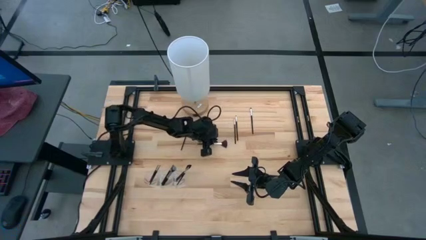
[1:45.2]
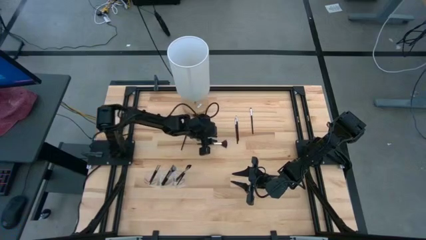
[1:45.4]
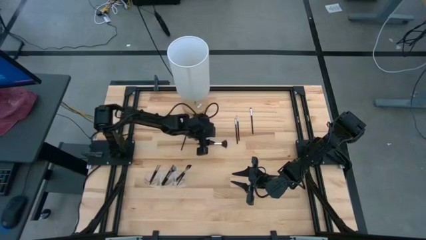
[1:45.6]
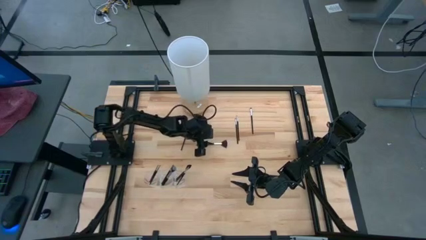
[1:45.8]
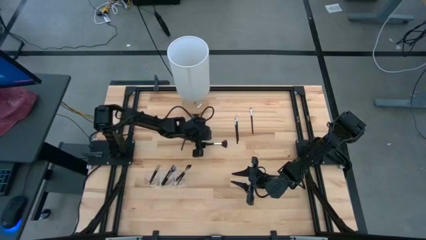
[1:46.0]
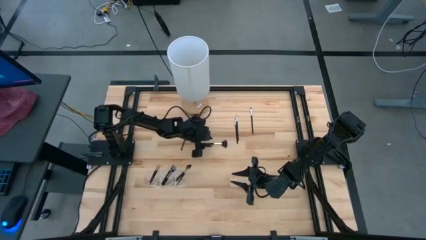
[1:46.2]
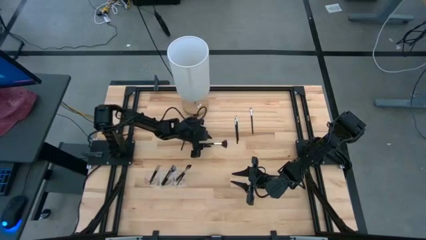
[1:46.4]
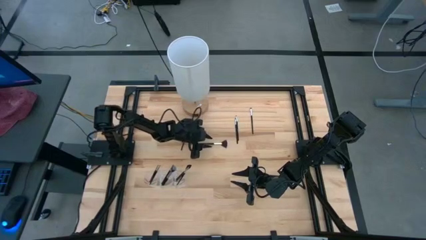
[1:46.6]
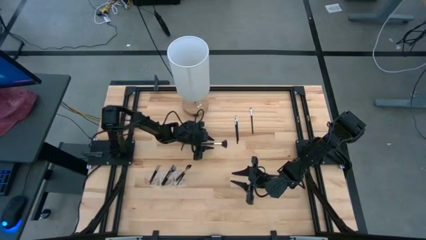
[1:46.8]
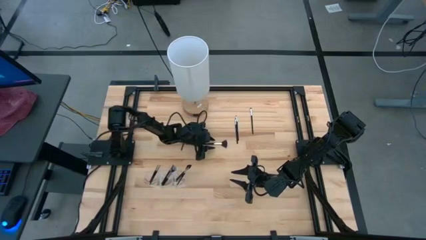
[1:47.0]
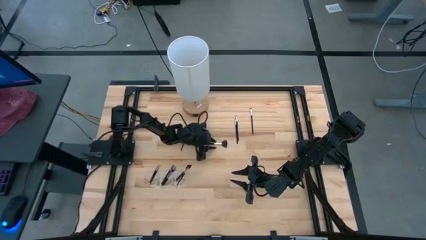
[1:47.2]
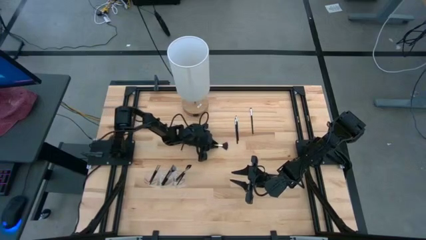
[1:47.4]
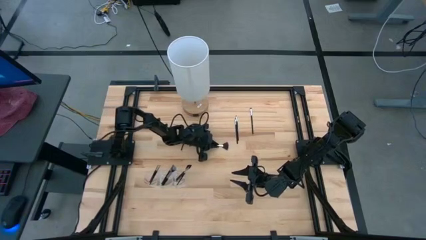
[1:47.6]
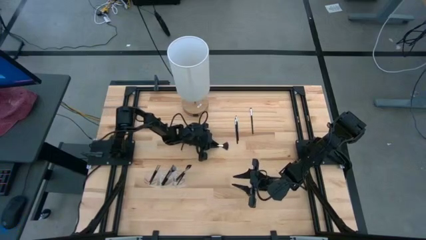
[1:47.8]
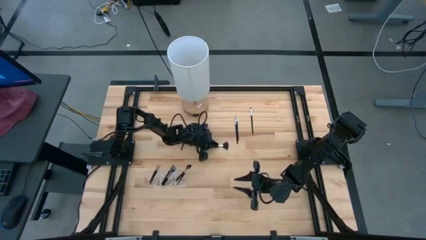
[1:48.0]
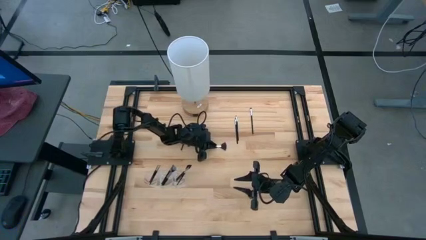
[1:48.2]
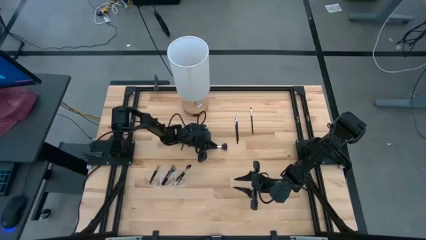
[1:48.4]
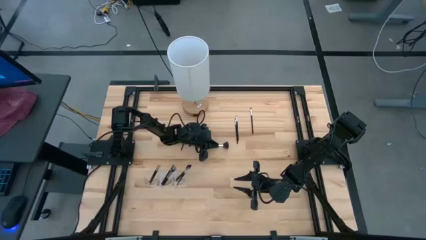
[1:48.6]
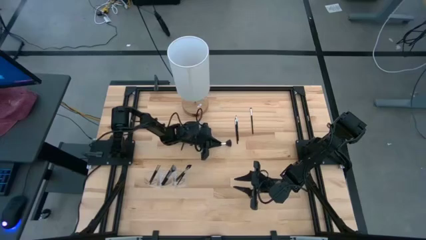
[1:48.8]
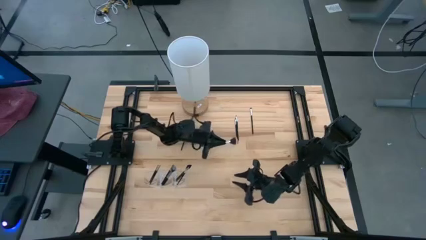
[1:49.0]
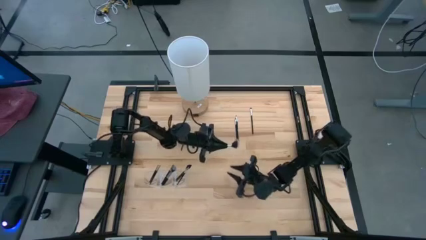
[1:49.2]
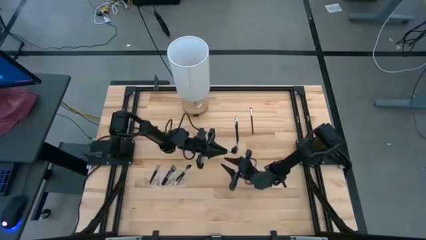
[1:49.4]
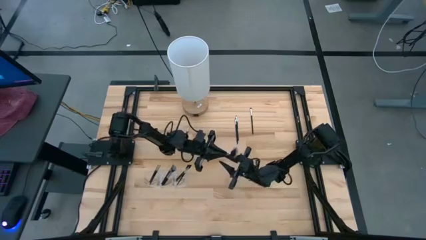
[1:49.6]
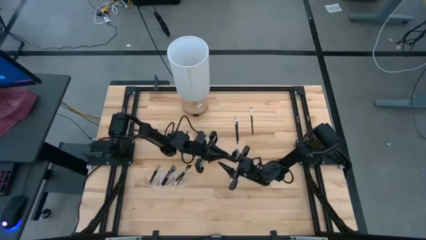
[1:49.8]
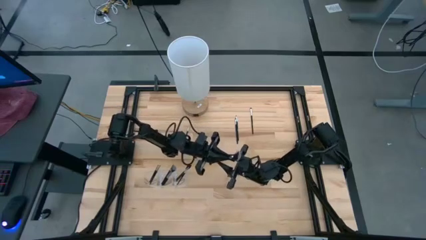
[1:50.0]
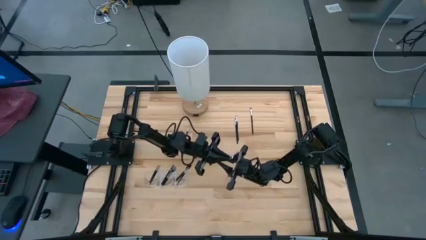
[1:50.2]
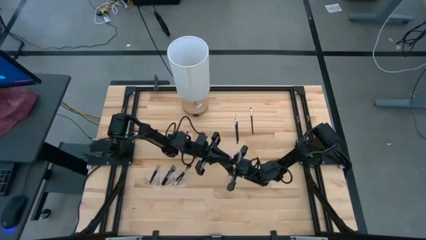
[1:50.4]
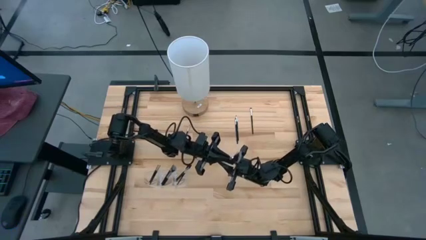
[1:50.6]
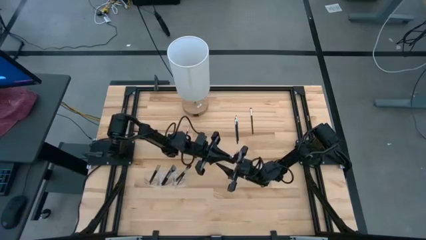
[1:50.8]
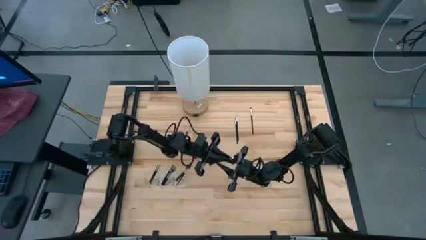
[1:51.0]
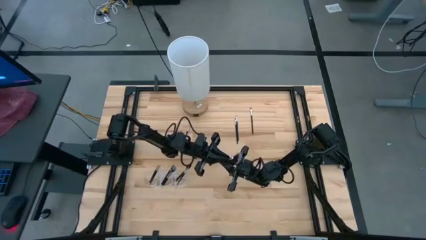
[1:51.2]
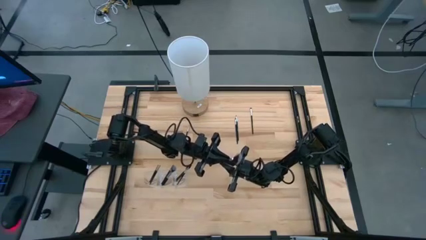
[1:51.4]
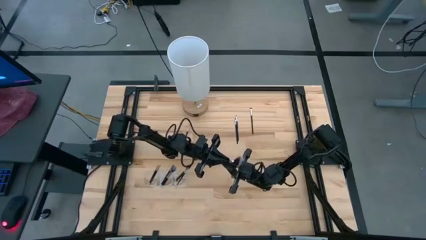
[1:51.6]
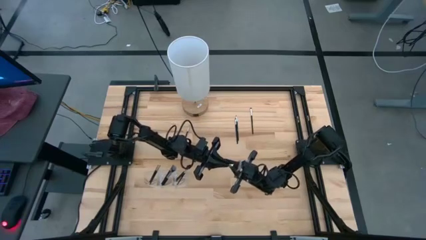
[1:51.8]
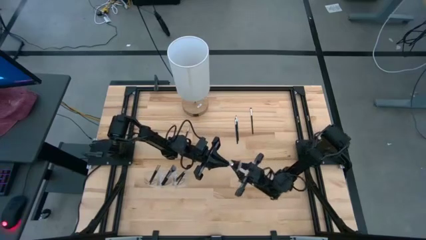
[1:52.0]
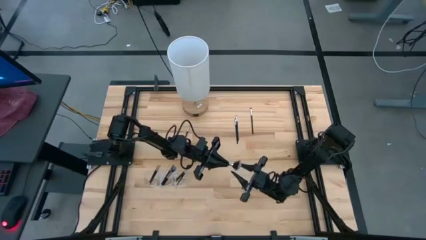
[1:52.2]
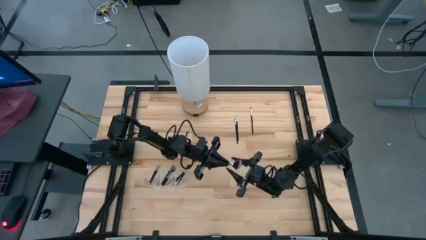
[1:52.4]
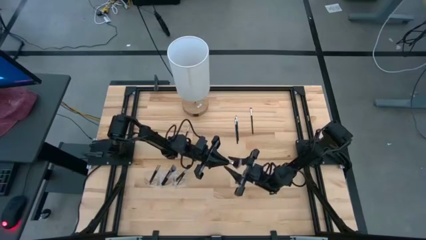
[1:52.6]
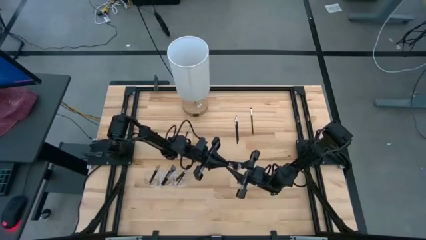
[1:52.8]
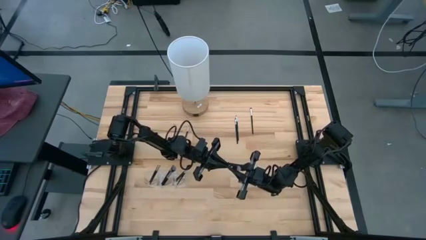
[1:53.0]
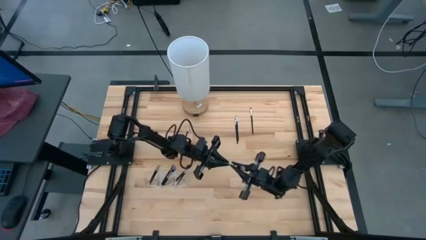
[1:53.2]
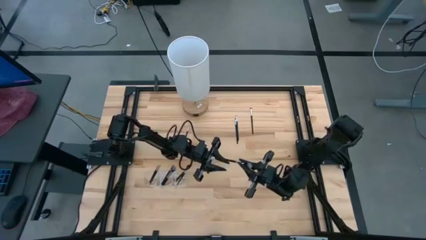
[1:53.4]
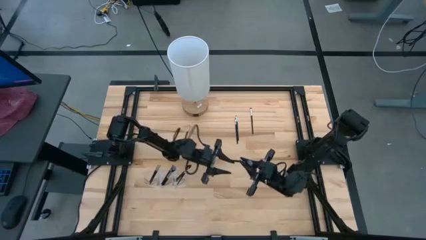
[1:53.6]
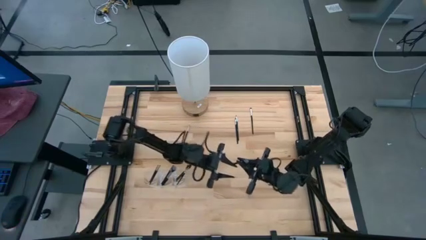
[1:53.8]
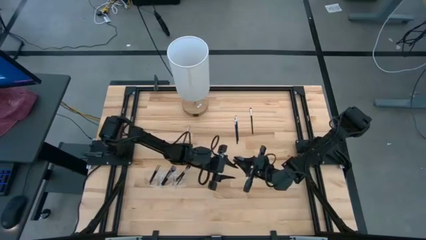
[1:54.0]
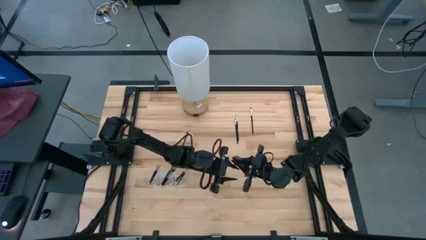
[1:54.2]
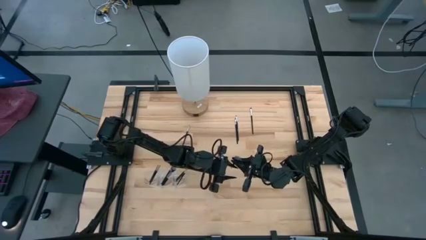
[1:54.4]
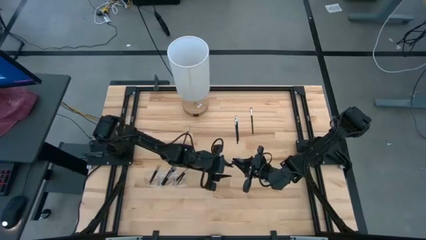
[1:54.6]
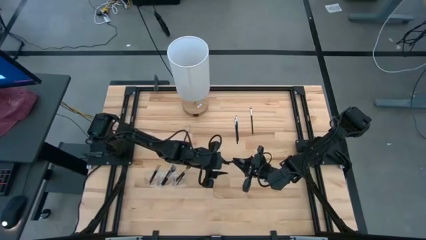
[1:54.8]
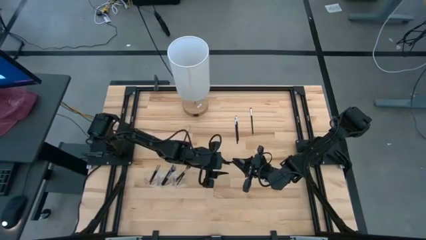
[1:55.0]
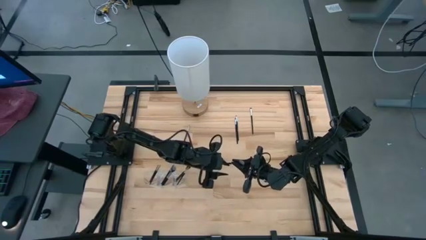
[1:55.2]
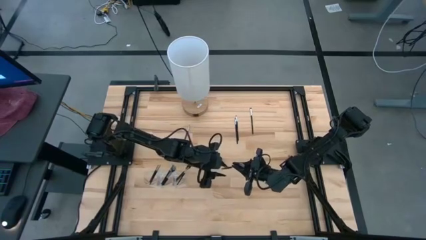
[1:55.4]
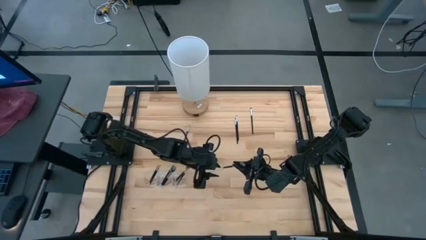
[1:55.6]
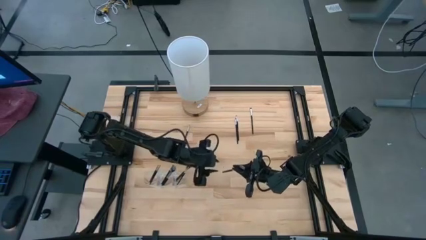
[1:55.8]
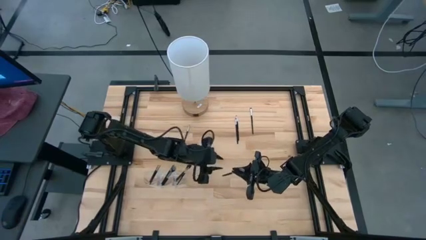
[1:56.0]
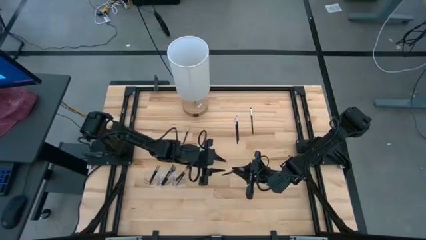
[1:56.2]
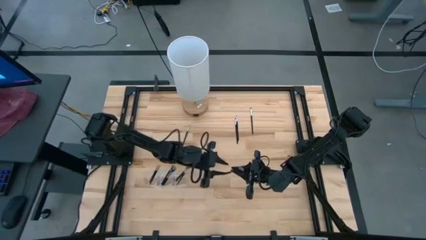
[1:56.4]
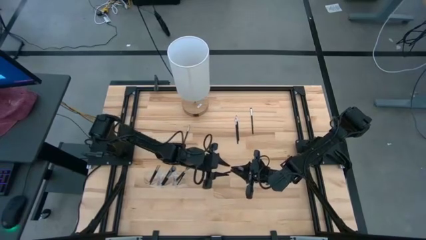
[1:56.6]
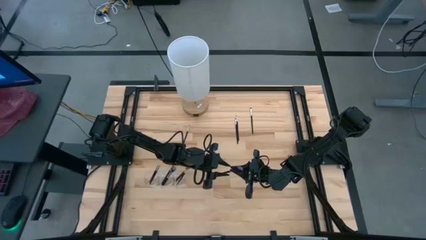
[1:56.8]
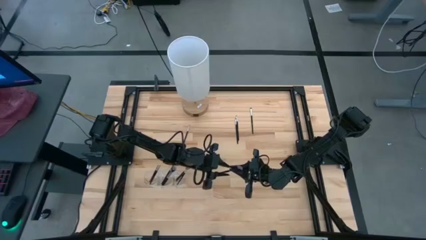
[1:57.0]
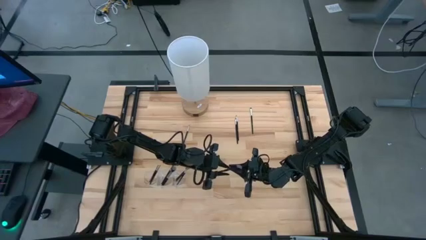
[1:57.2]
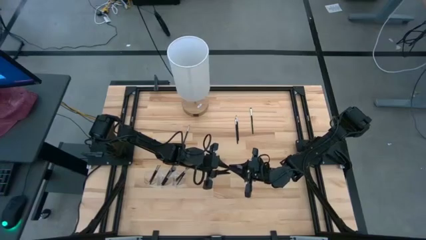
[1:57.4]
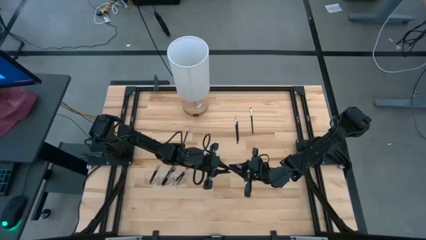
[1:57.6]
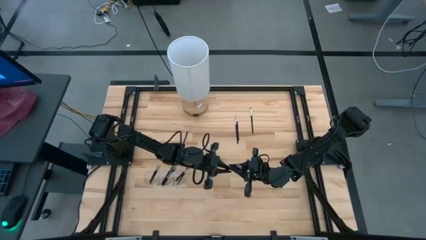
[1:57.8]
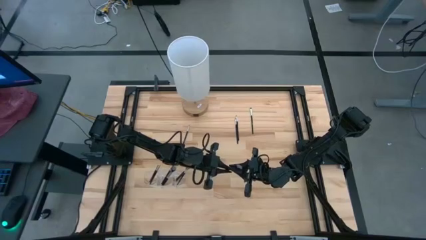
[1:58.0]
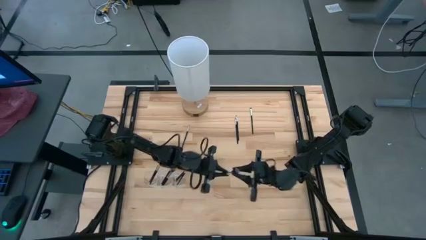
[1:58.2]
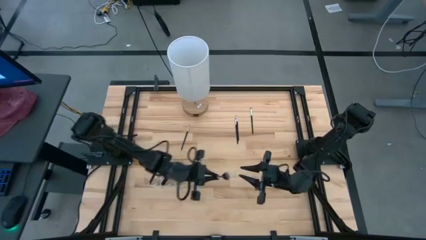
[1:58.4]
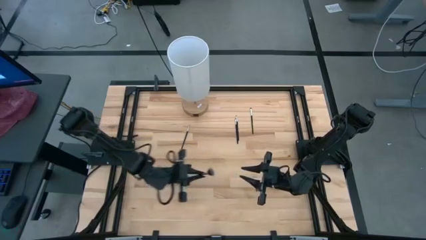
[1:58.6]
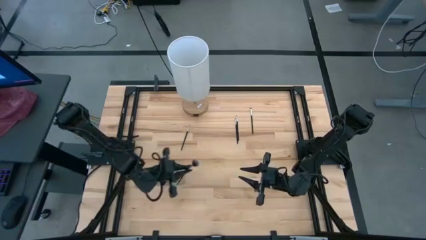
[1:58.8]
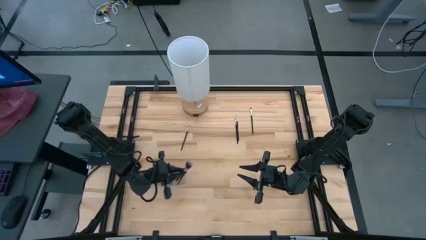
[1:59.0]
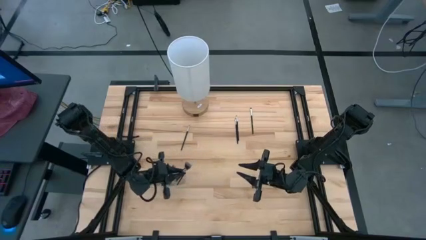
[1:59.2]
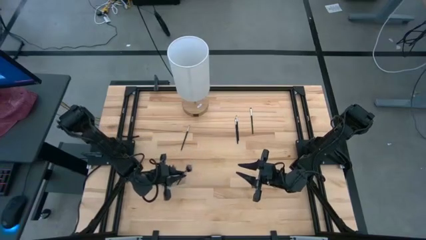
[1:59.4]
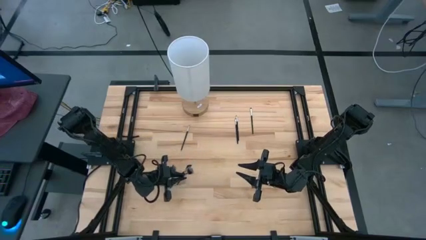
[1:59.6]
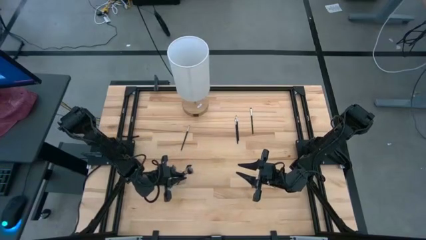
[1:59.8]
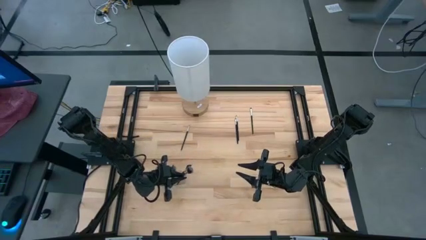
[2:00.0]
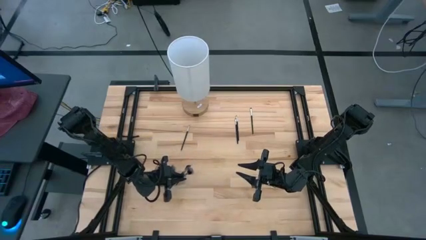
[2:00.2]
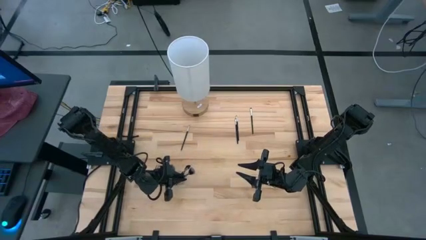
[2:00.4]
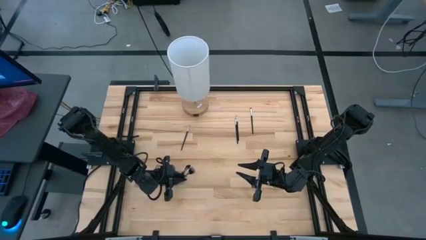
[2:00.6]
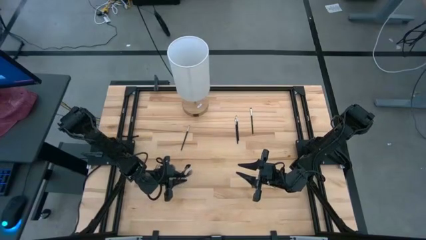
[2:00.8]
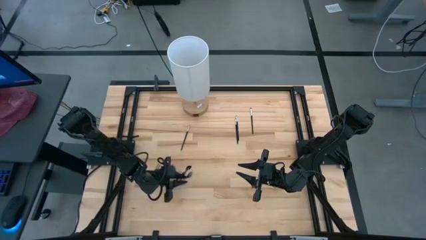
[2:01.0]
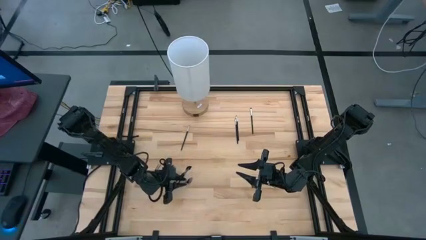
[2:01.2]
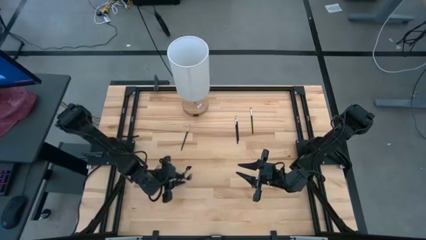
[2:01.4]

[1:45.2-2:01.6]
Task: Put items in baskets/containers
Put the highlighter brush in the transparent organizer
